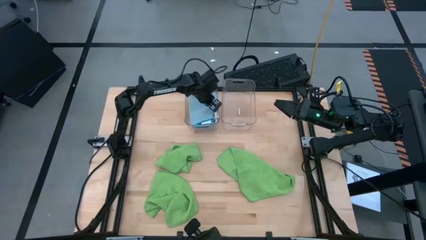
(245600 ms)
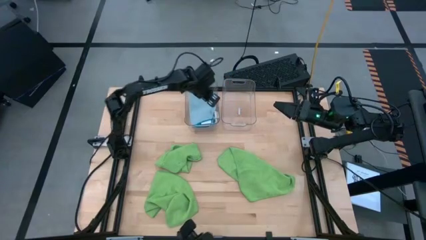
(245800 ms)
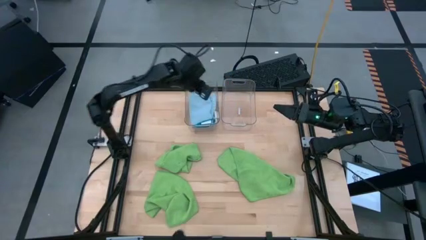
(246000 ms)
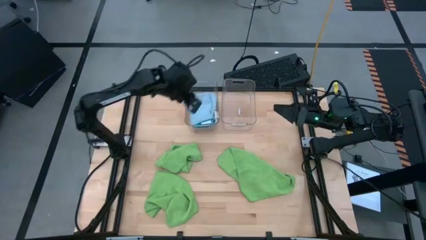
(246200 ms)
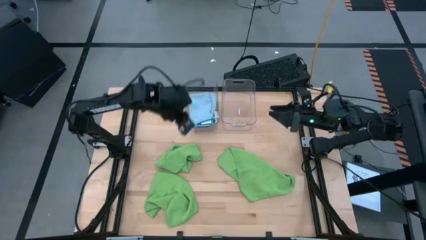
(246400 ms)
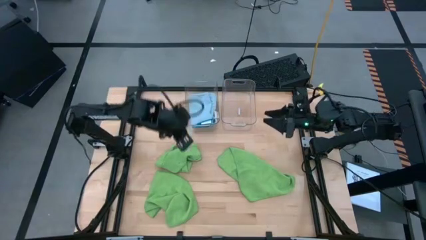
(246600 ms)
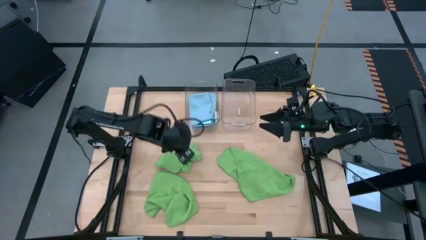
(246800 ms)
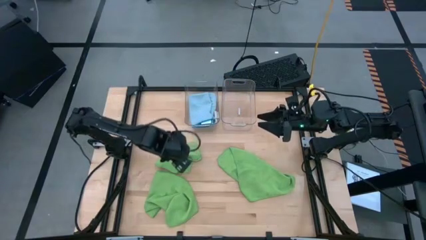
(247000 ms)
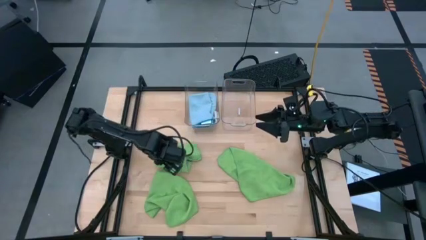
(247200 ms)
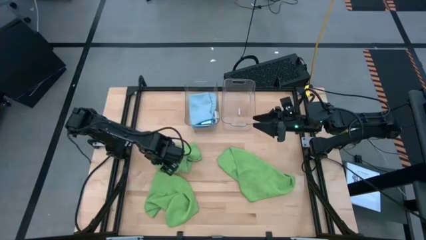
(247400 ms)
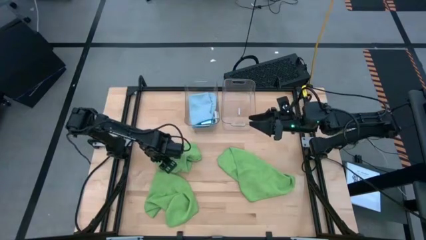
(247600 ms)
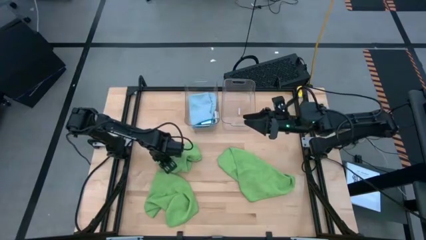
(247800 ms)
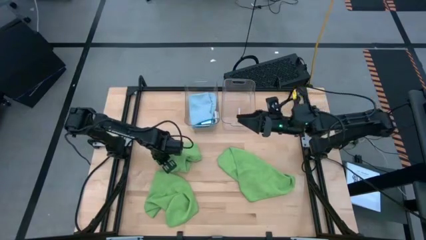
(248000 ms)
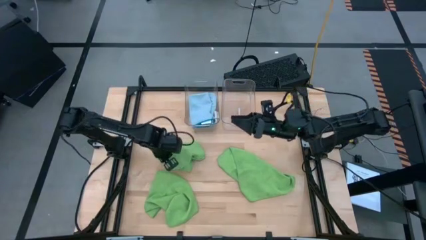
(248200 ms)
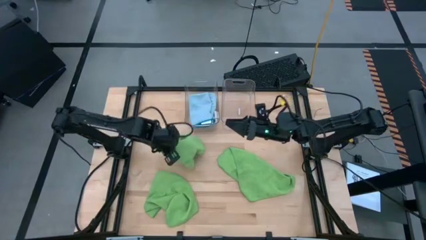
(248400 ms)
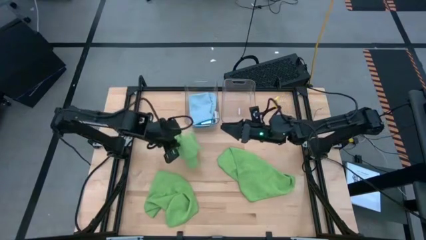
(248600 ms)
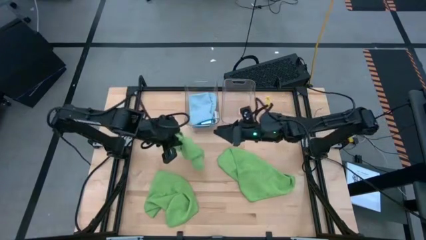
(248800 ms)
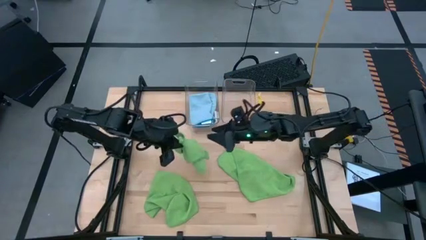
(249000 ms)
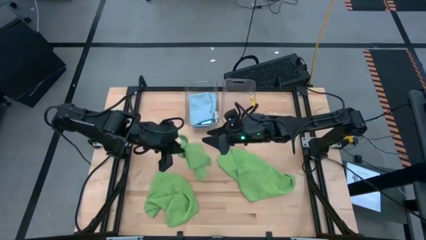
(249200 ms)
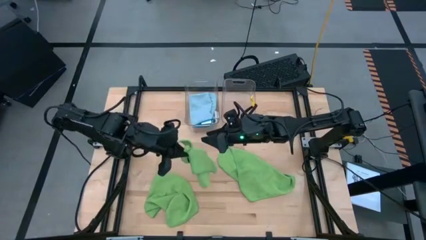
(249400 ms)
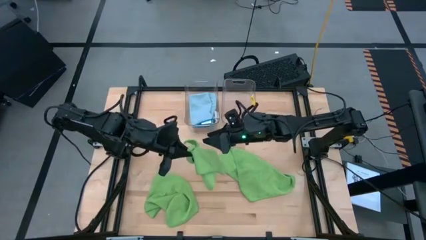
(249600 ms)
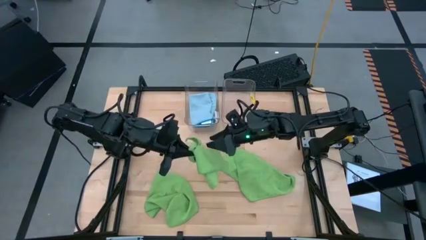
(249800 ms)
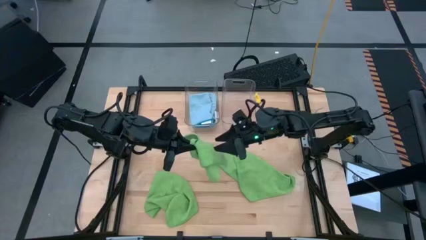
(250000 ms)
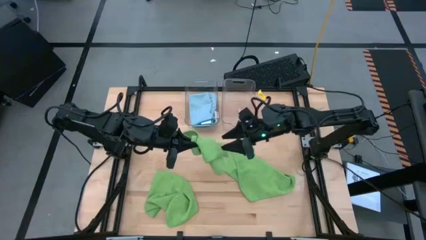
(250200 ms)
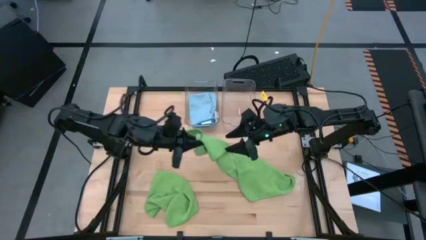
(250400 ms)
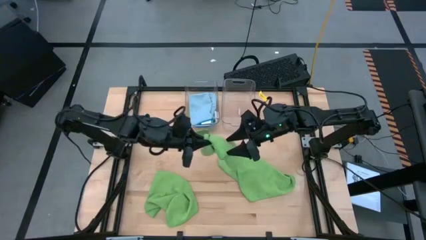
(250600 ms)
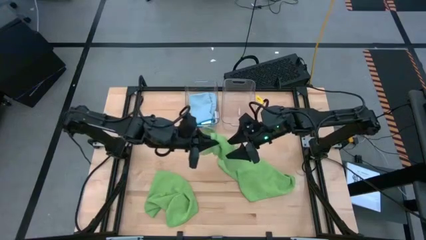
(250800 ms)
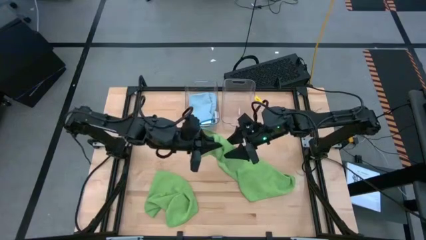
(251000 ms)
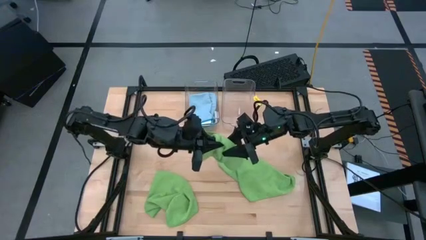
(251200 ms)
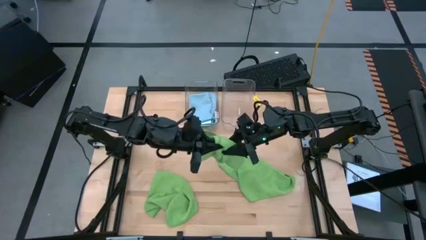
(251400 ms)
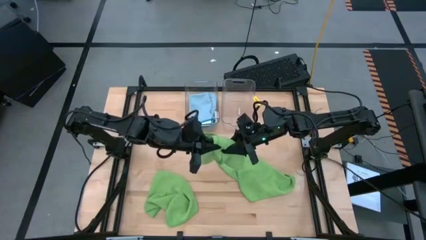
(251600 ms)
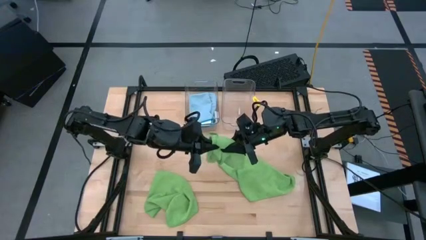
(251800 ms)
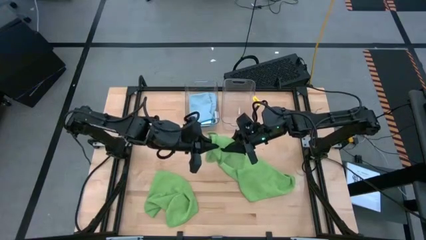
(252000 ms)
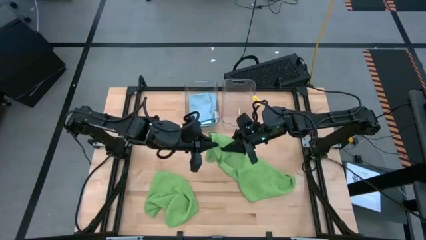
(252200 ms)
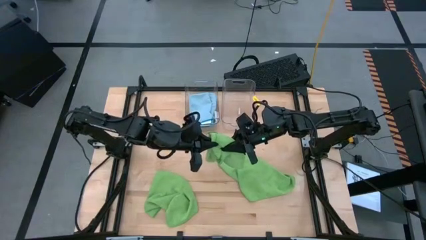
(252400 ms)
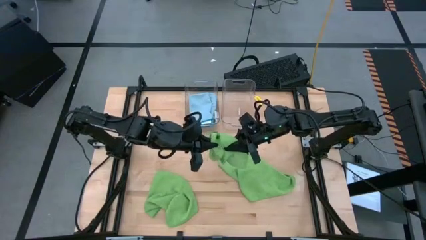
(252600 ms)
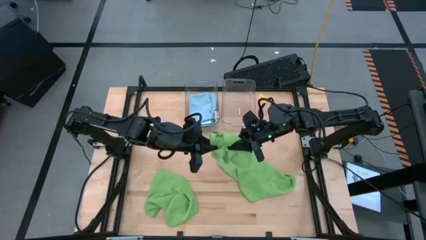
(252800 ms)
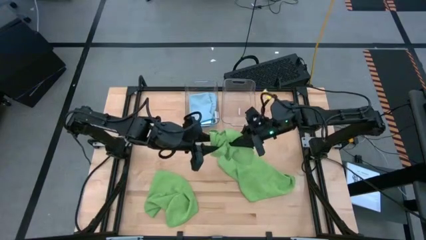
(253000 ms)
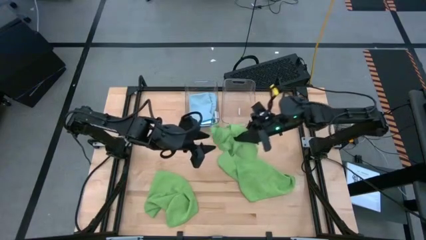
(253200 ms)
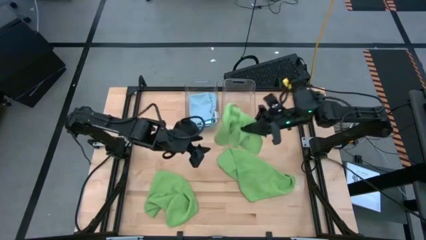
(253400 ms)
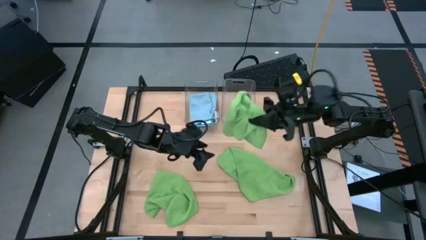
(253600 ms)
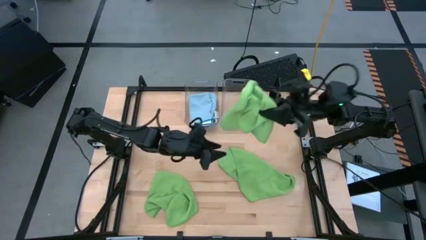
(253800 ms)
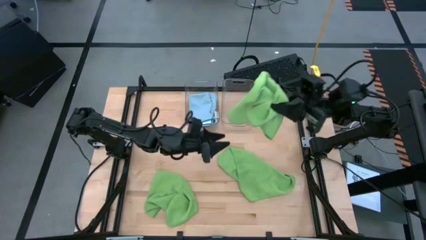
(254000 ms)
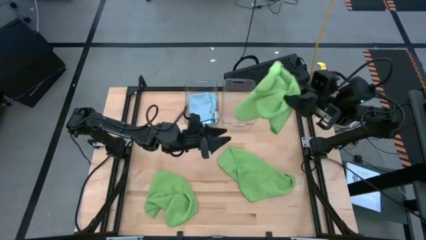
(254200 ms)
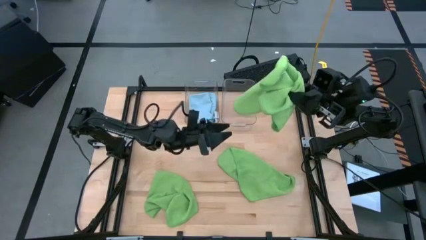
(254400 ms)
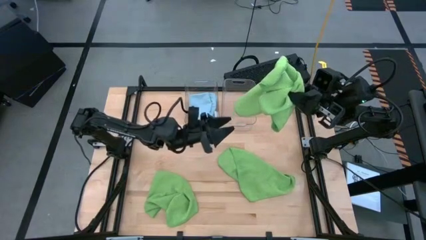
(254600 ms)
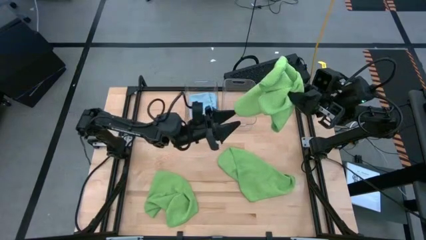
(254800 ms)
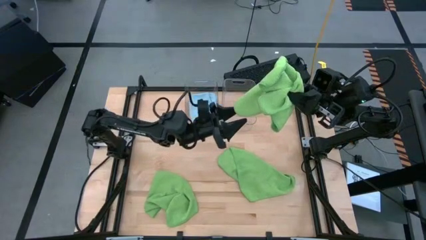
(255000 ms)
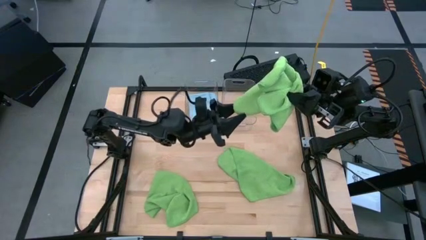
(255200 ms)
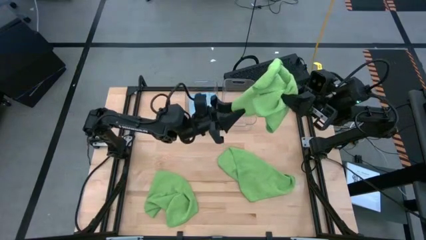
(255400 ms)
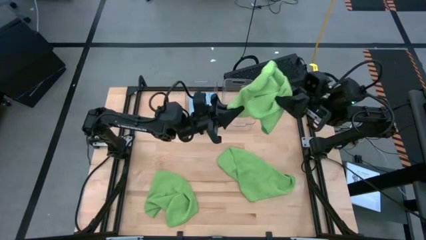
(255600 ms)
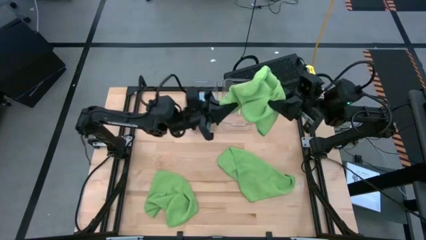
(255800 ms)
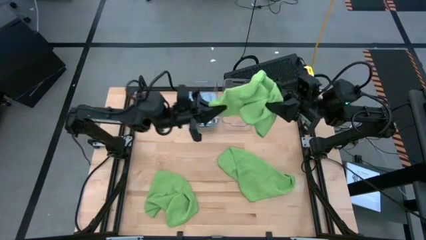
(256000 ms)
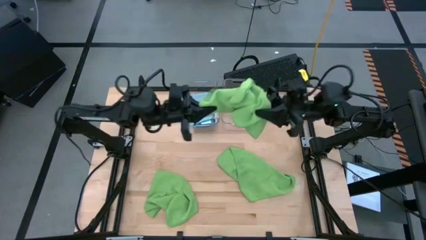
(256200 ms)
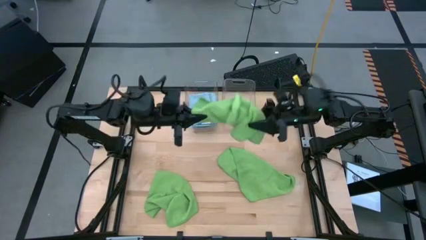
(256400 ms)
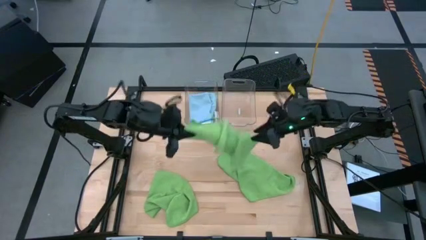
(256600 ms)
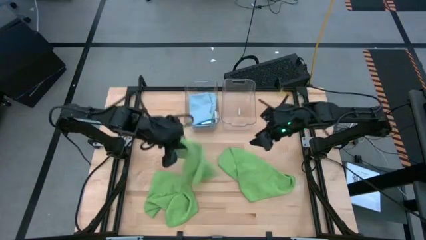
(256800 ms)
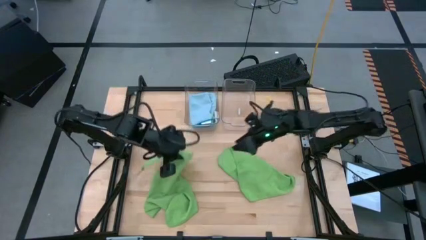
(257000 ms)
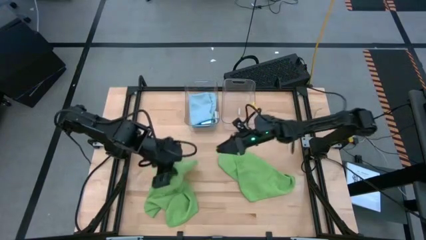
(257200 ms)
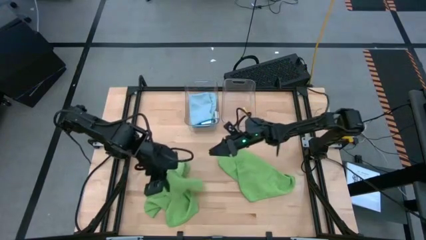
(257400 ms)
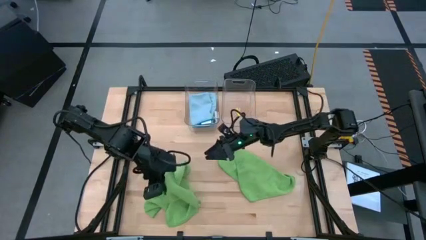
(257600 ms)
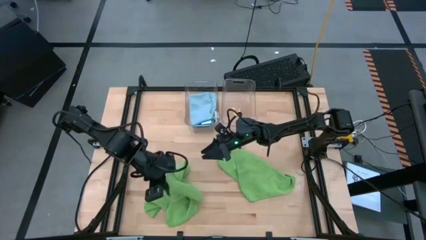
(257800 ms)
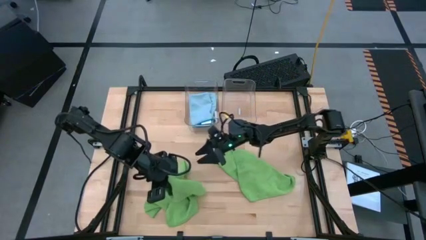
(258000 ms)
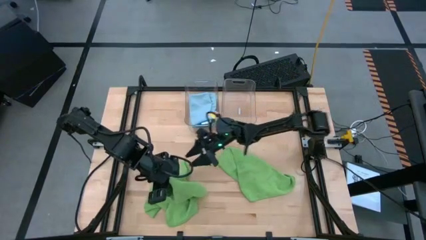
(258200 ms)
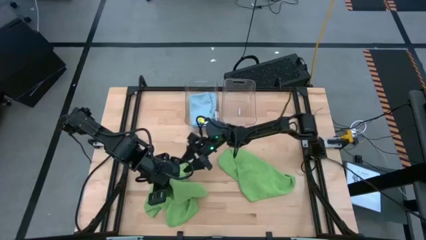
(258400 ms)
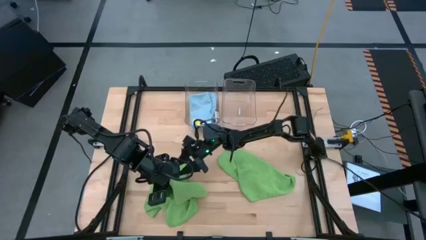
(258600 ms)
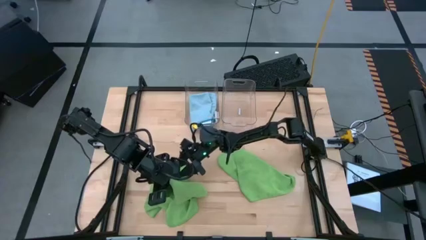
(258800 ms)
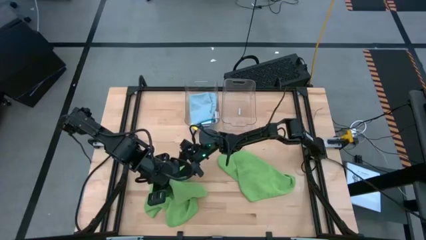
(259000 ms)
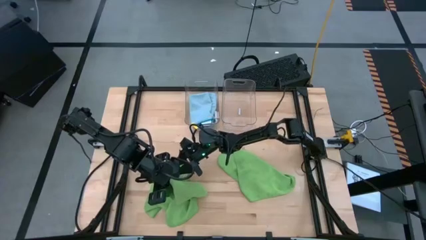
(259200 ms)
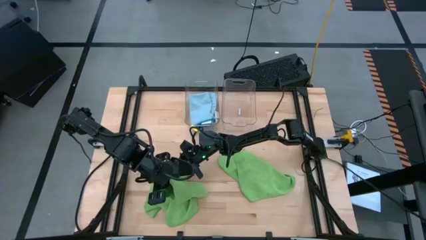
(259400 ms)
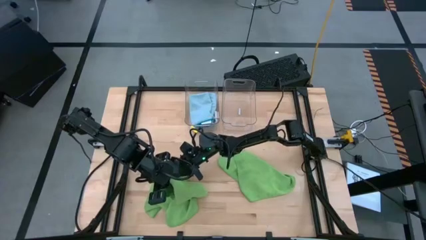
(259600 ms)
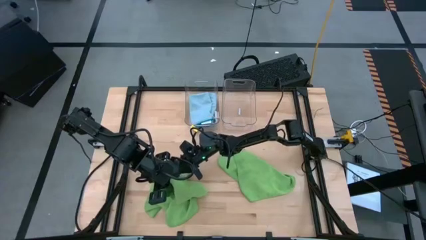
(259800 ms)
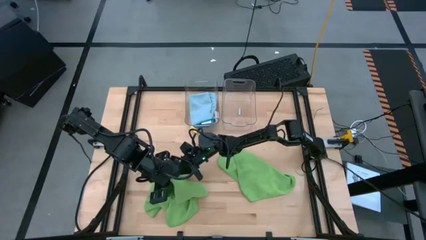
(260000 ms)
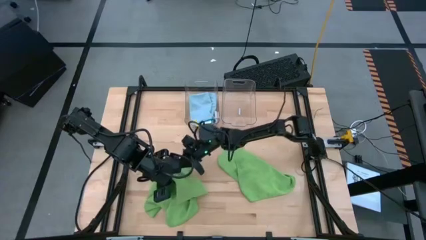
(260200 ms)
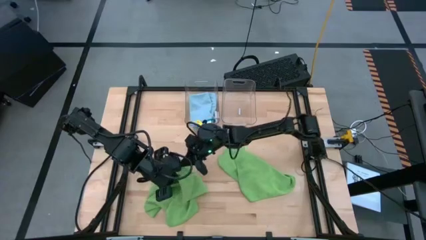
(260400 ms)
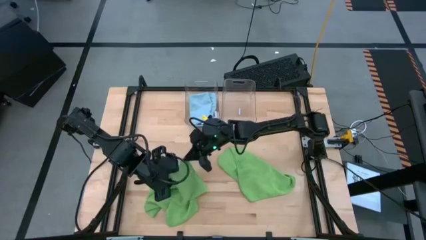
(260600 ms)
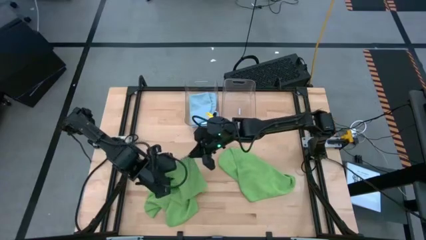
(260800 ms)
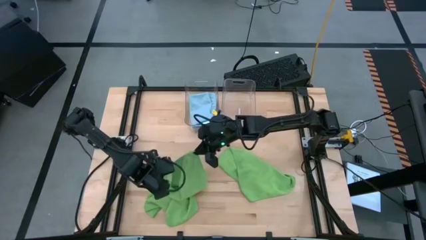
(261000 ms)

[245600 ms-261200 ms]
Task: Fold microfiber towels
Fold the top left green microfiber towel
